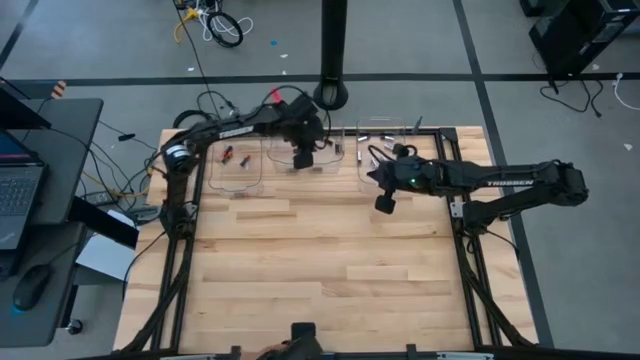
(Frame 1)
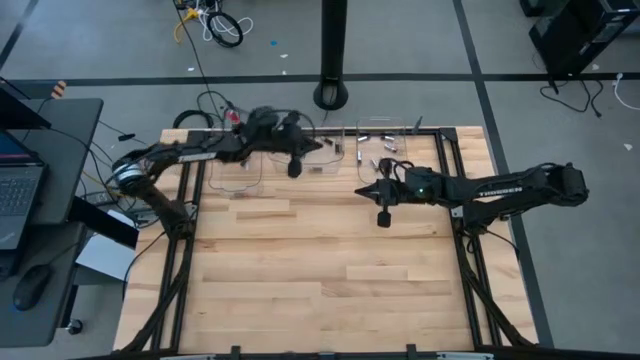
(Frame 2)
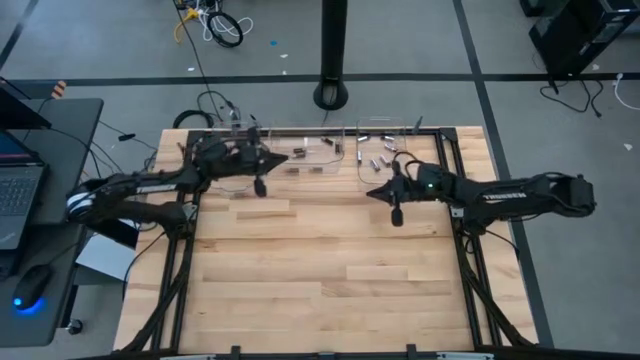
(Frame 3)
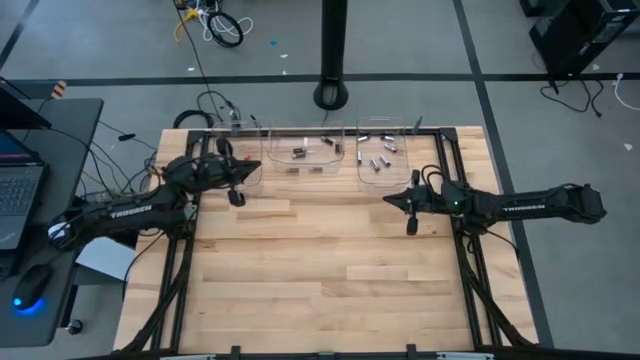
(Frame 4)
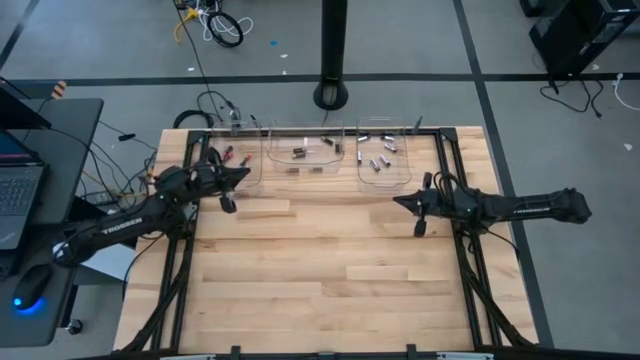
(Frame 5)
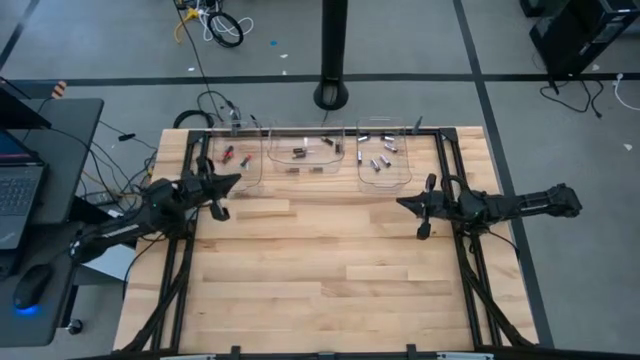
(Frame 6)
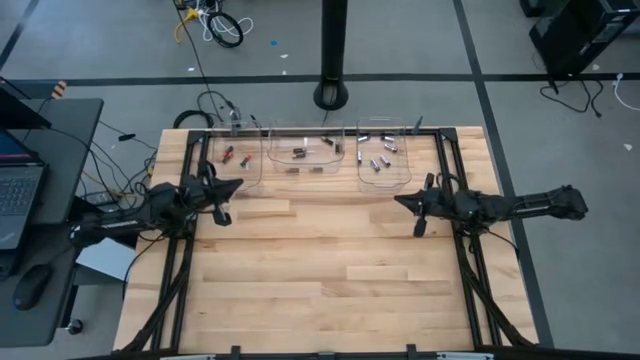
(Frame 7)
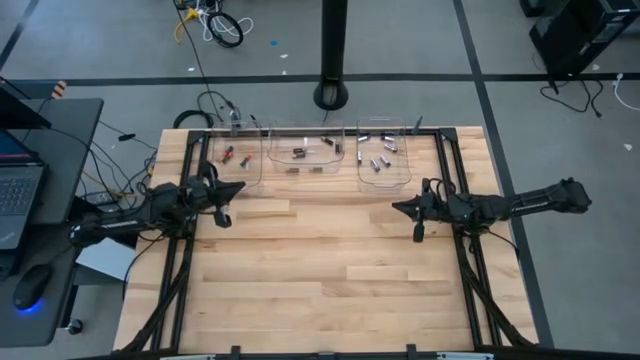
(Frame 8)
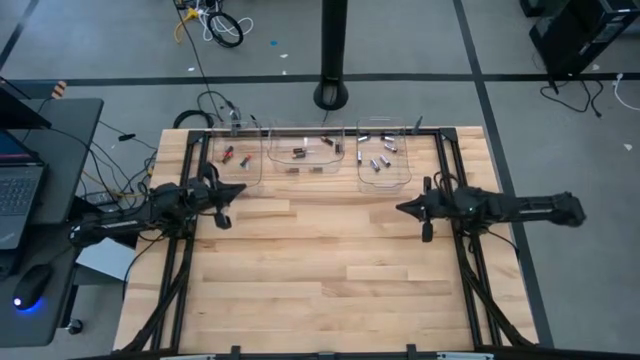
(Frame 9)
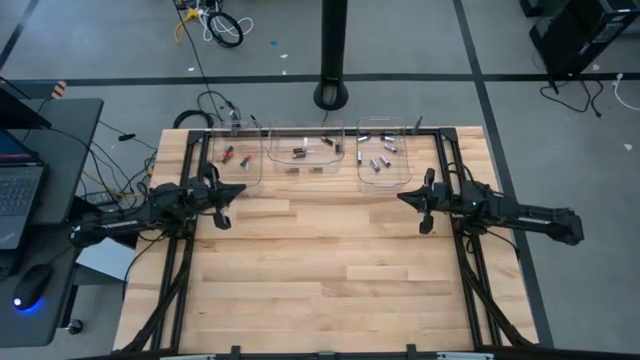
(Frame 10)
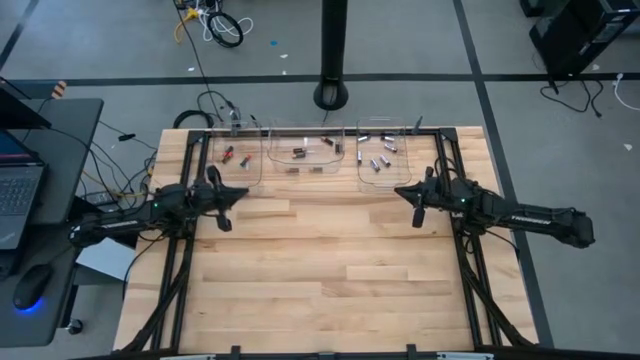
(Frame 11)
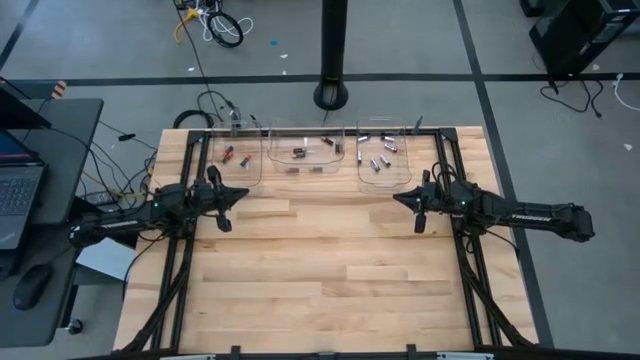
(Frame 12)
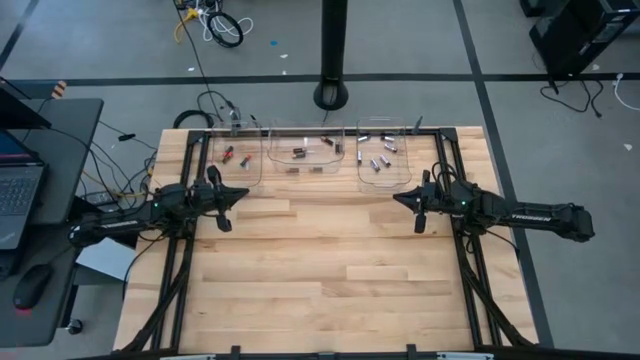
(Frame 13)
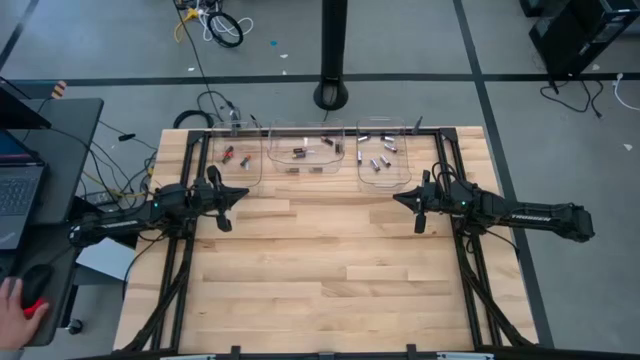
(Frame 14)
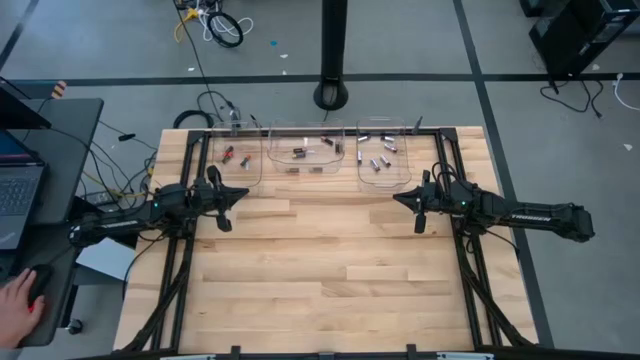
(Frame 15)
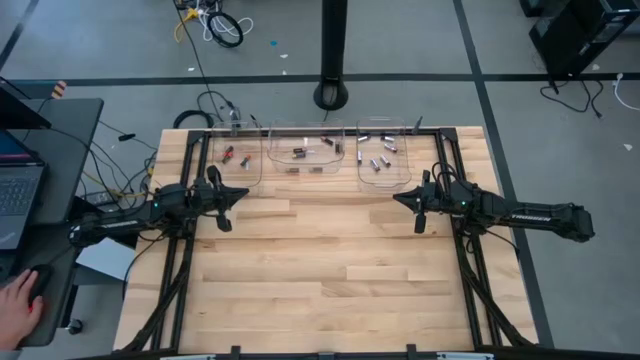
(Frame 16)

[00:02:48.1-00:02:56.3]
Task: Sort batteries
Return to Home Position

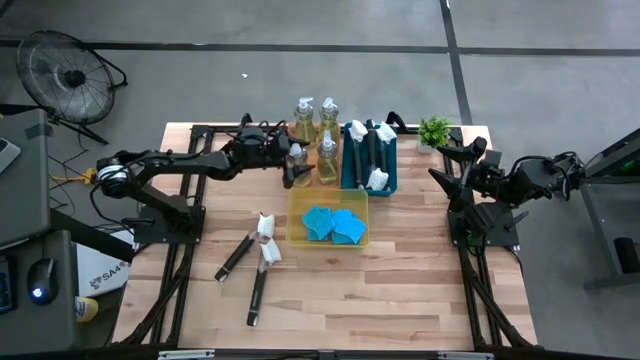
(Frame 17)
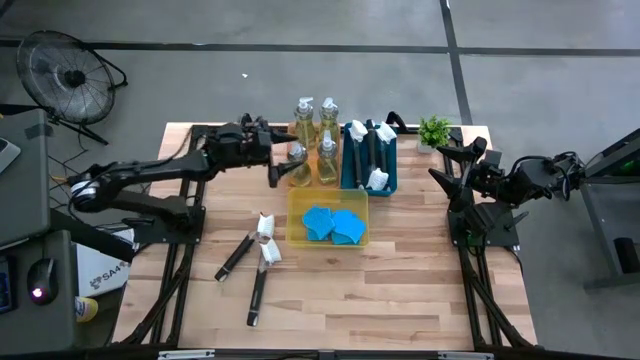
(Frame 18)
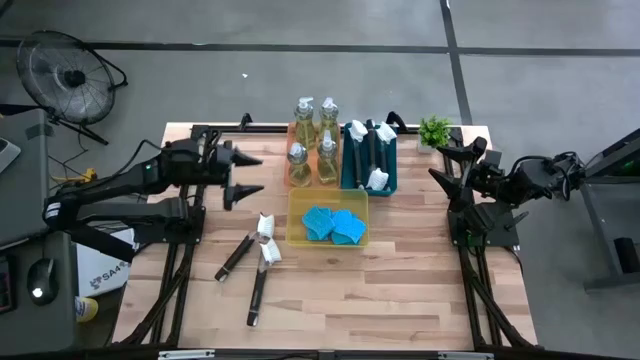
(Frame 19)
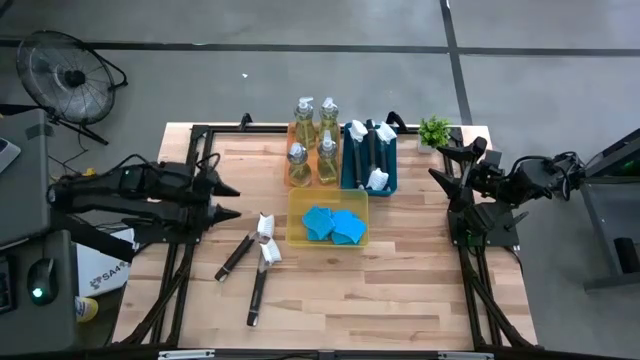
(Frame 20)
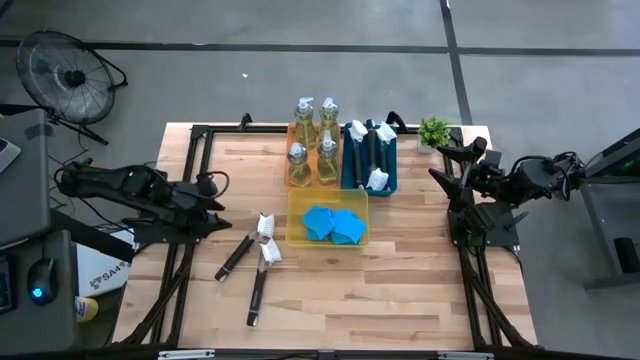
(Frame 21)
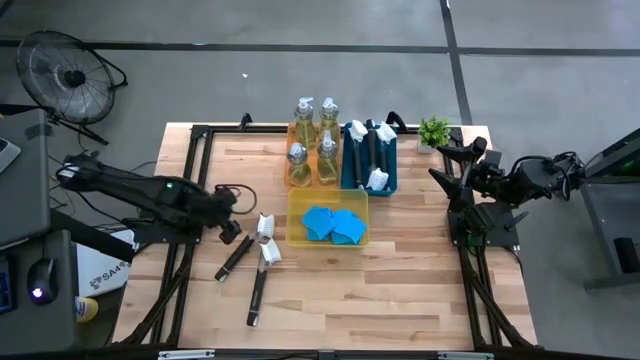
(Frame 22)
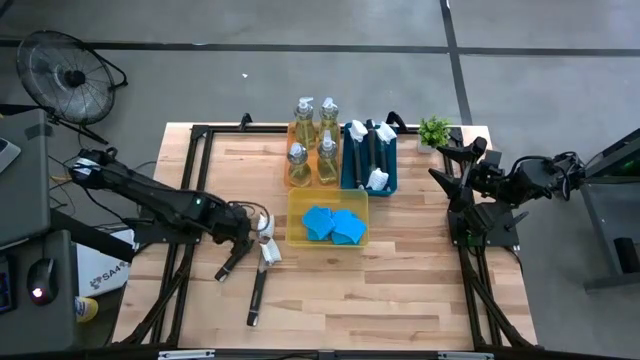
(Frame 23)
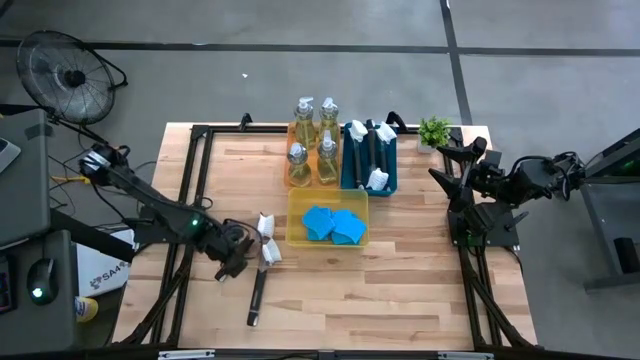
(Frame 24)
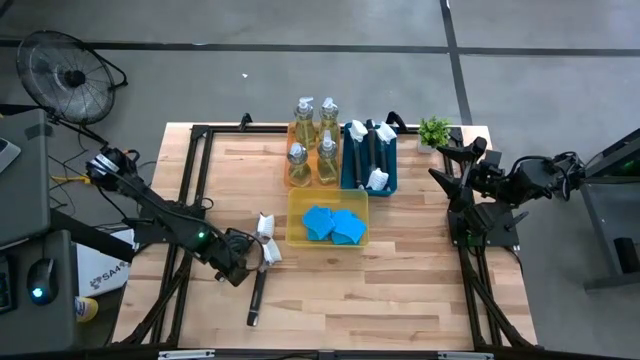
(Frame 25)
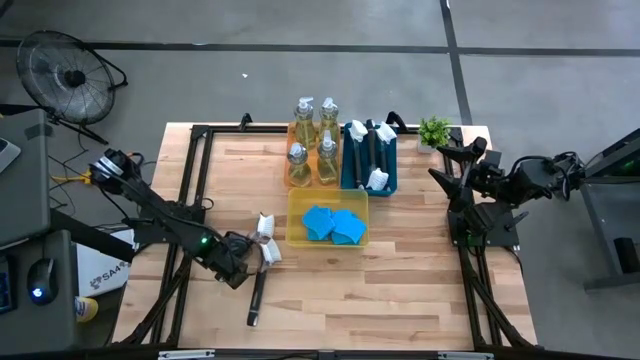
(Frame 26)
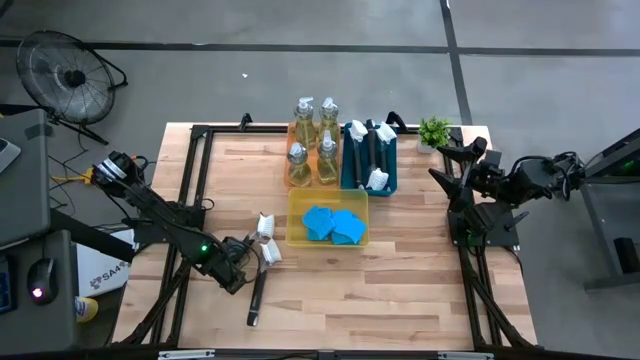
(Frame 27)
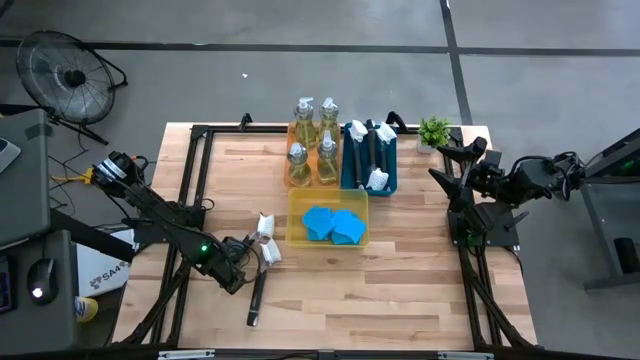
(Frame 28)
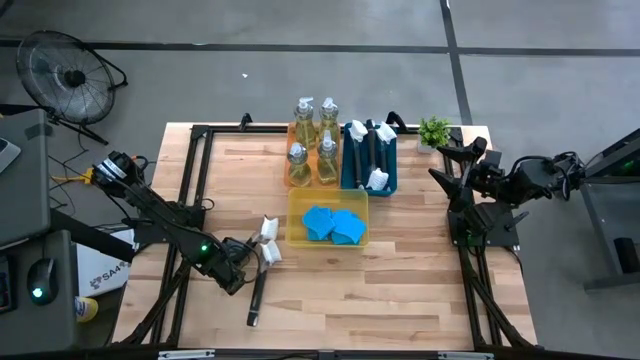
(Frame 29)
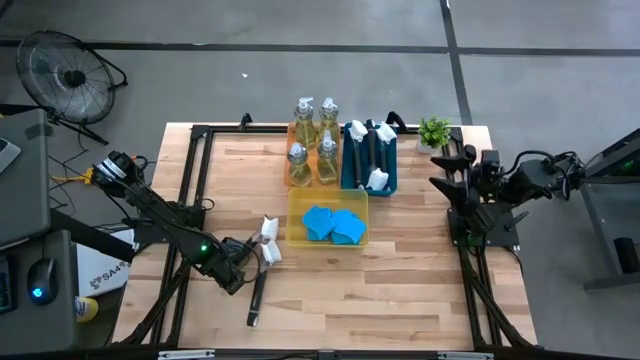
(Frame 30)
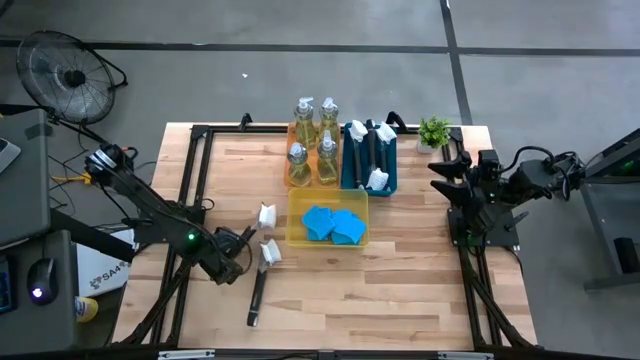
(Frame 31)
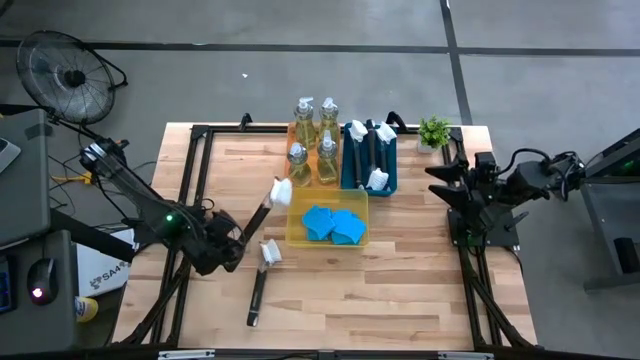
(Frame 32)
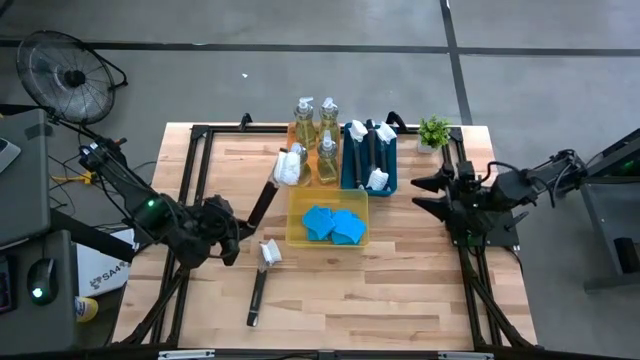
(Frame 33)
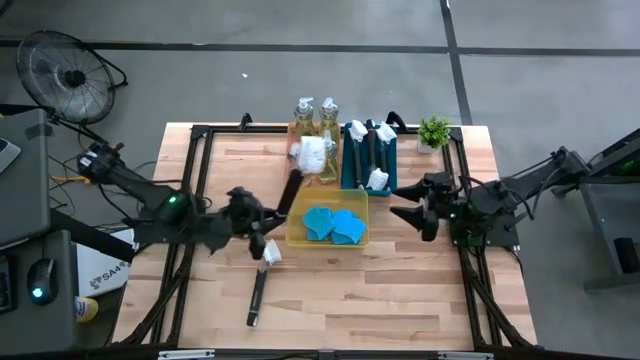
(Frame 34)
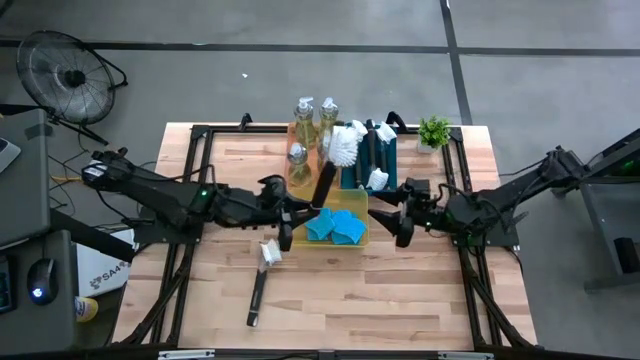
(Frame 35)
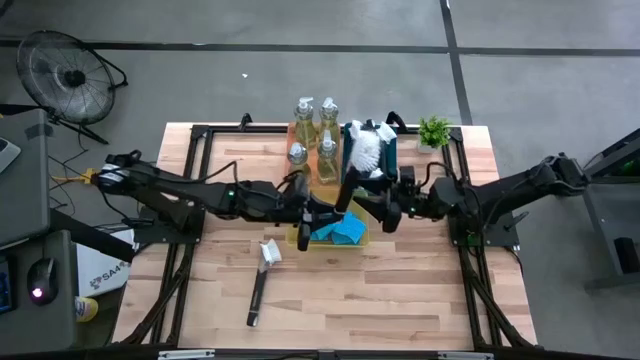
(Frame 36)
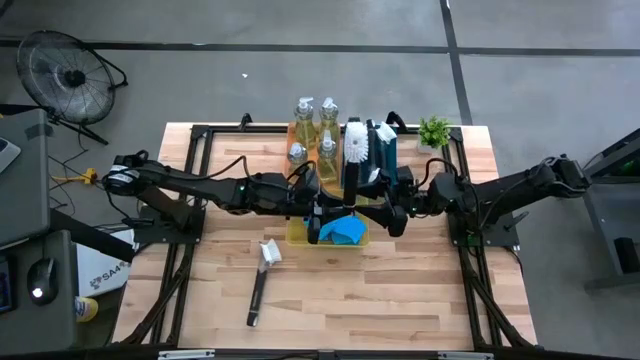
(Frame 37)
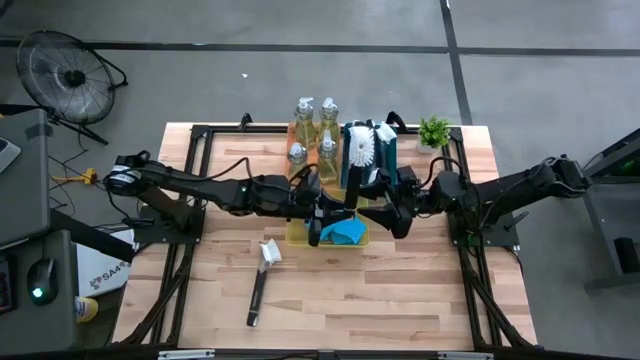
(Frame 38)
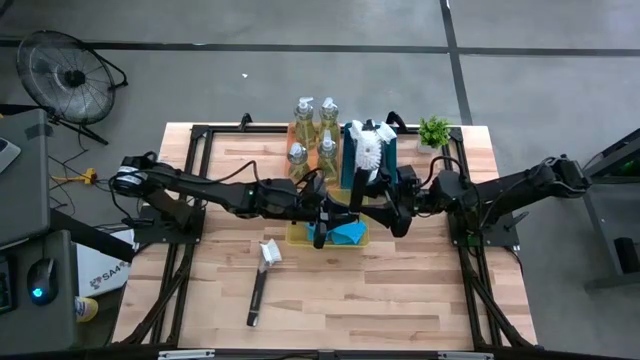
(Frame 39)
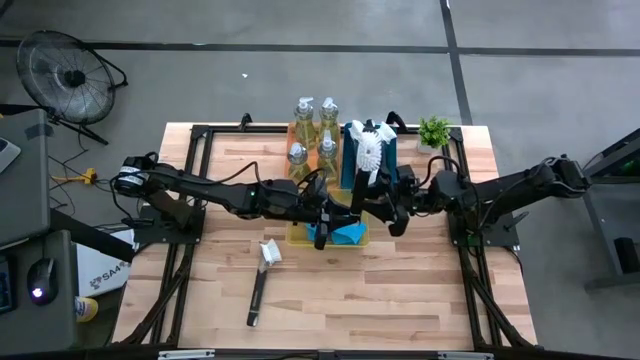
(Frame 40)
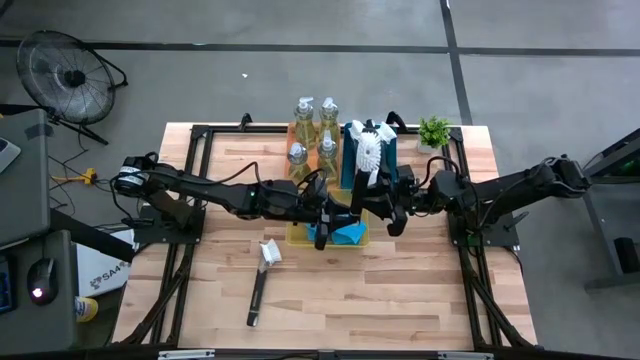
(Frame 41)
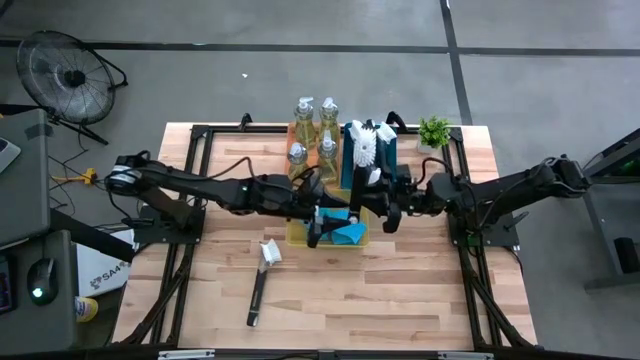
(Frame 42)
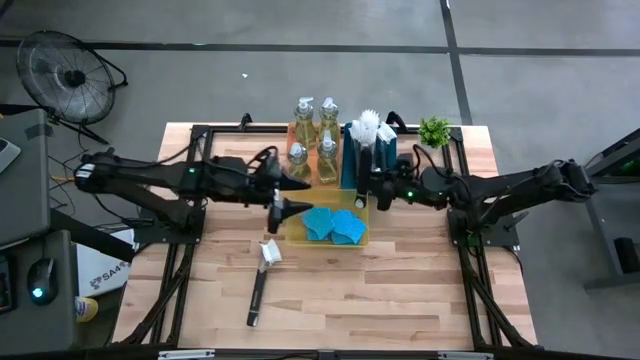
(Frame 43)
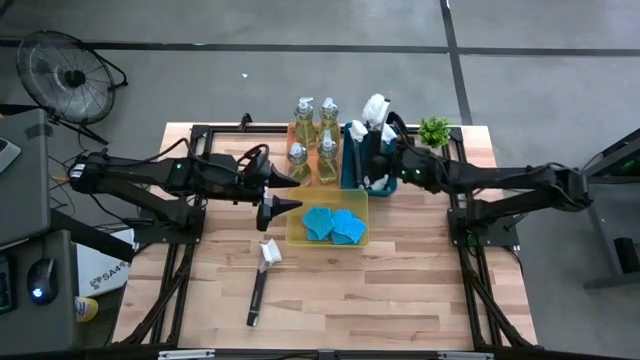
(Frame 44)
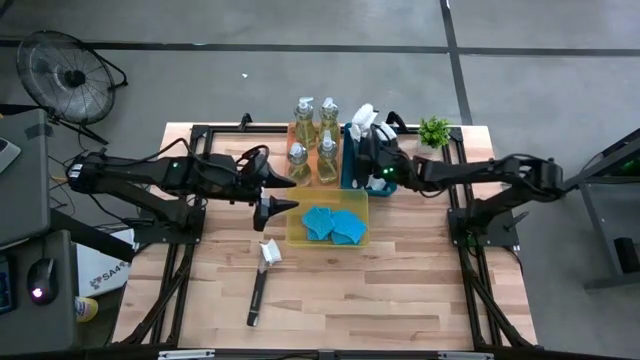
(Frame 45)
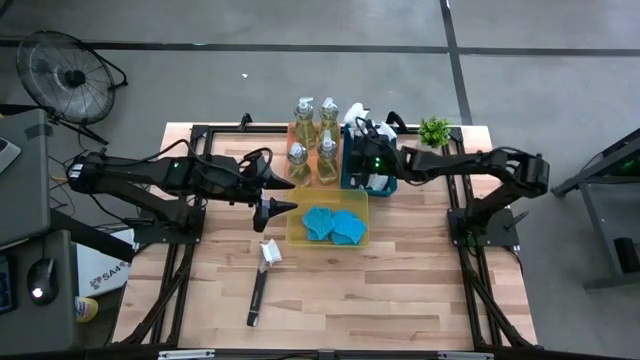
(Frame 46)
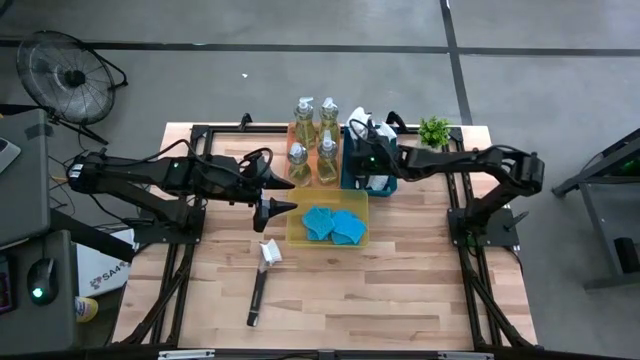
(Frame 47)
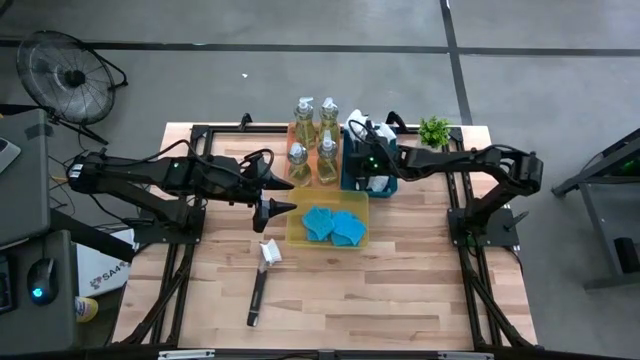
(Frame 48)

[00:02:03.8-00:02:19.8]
Task: Pick & Place Kitchen Sink Supplies
Put the dish brush into the blue bin
